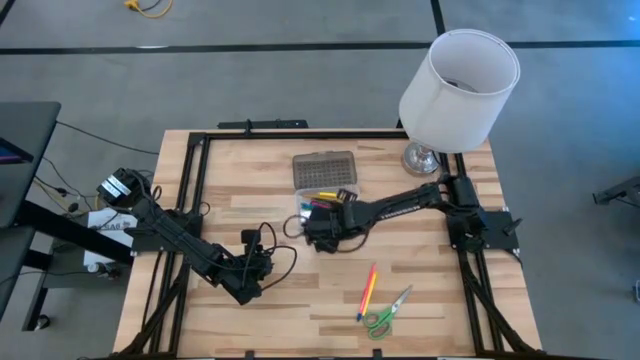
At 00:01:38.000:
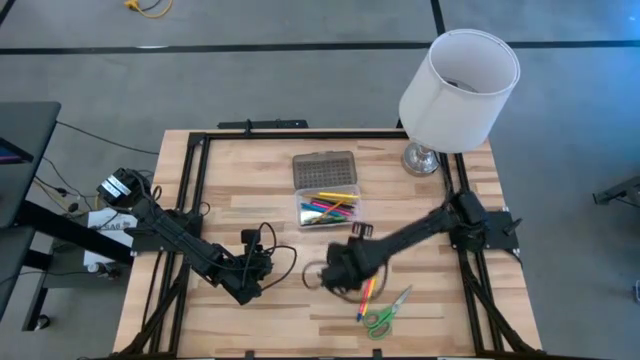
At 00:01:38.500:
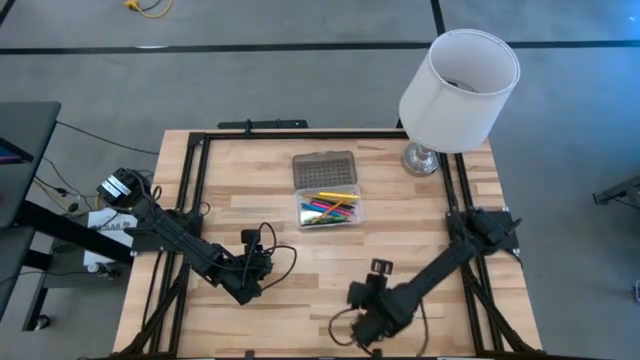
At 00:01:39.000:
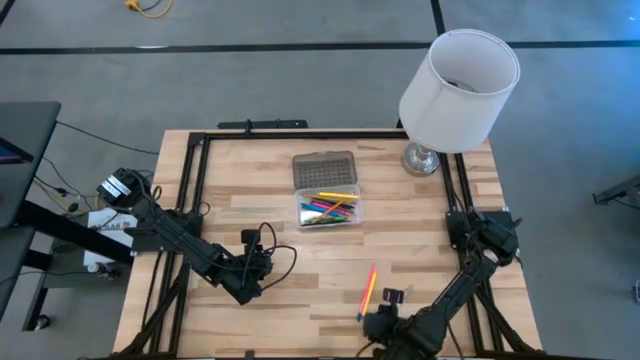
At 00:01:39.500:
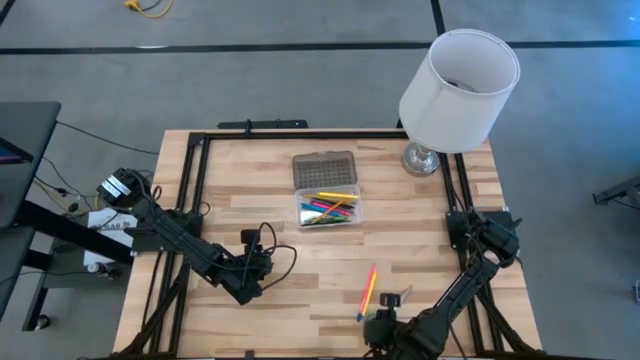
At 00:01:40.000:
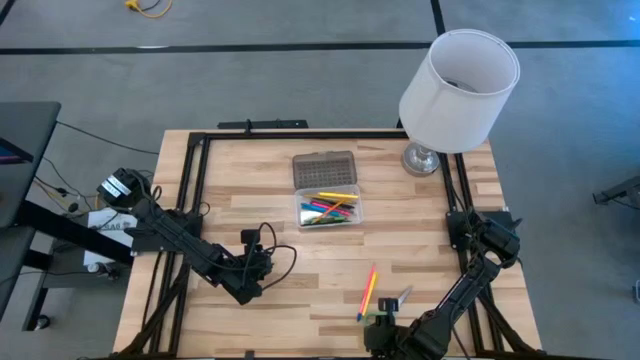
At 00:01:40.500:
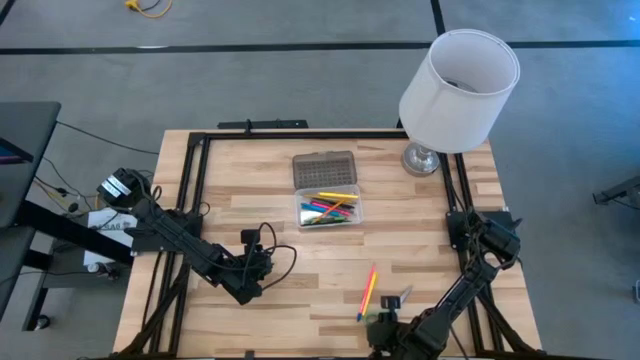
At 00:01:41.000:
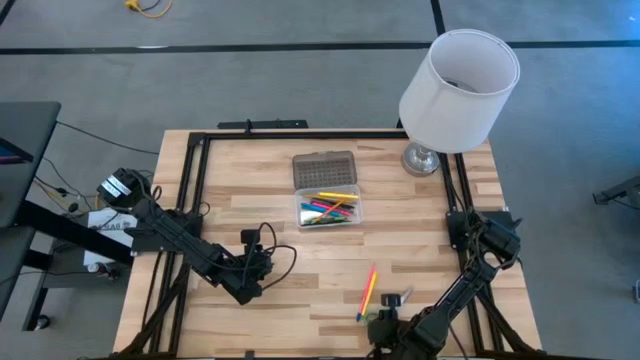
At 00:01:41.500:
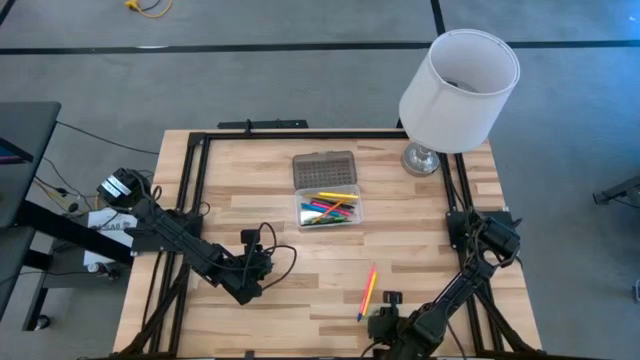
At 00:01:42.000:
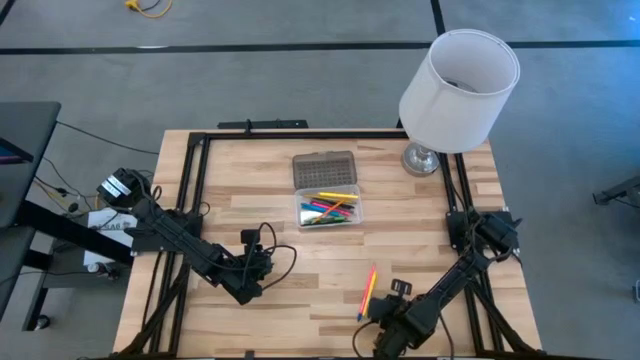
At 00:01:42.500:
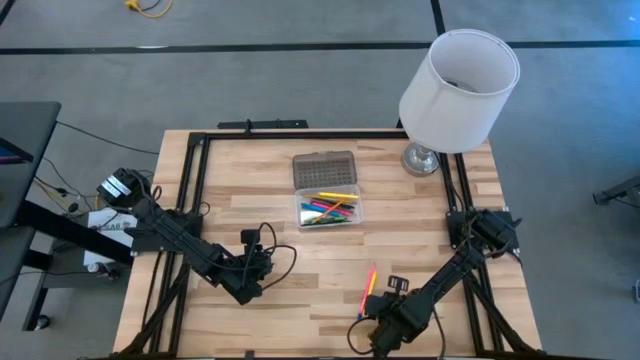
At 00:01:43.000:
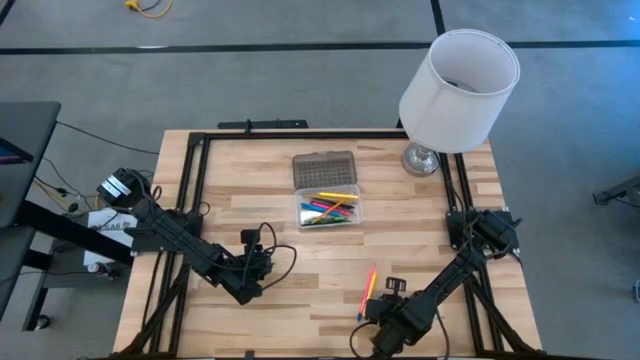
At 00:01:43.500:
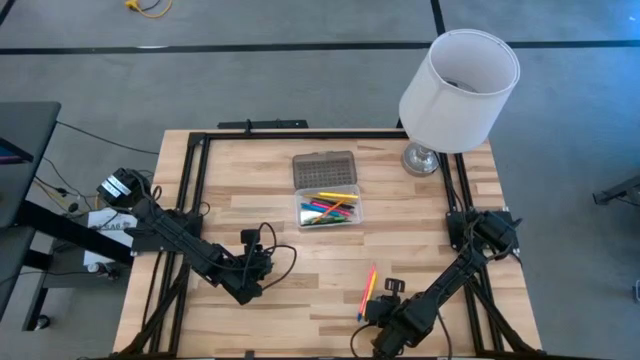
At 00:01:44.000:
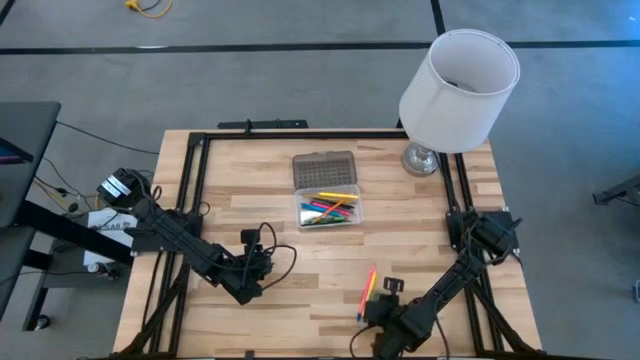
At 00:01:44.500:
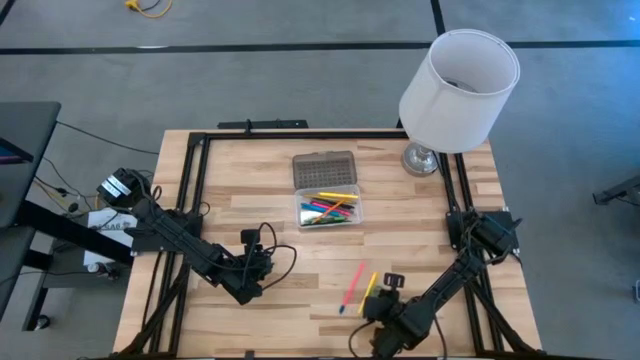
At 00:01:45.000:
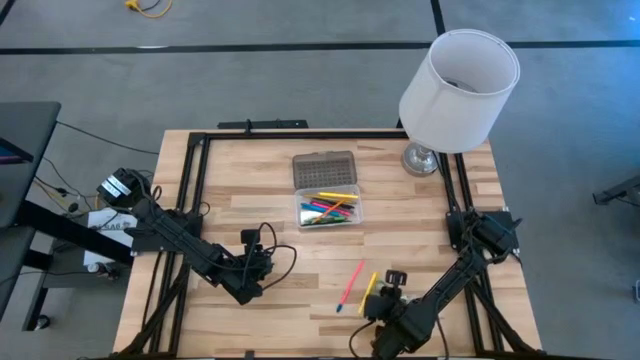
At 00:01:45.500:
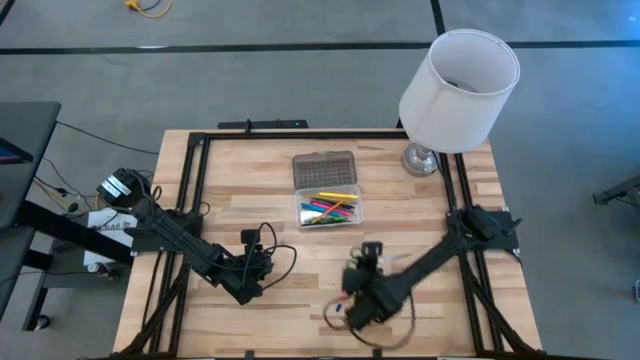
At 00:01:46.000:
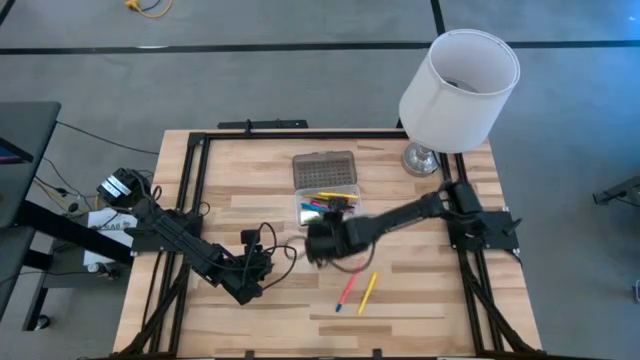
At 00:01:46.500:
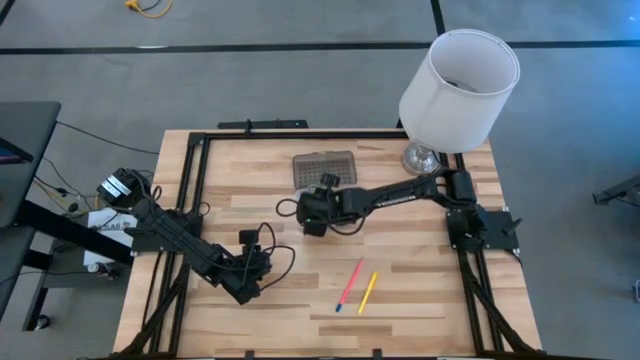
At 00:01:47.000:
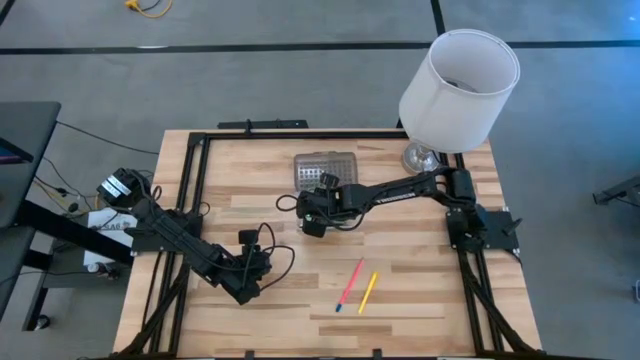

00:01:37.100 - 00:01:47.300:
Task: Pick & place school supplies into a supply box
Put the green scissors into the gray supply box

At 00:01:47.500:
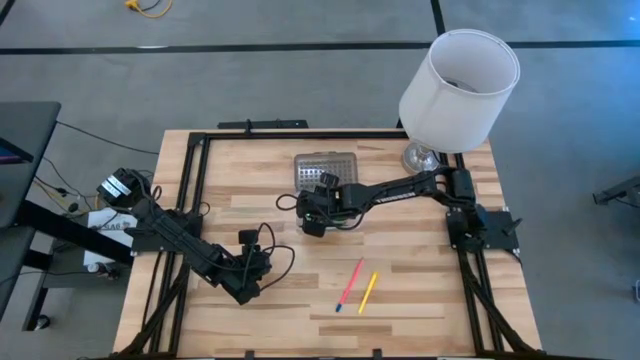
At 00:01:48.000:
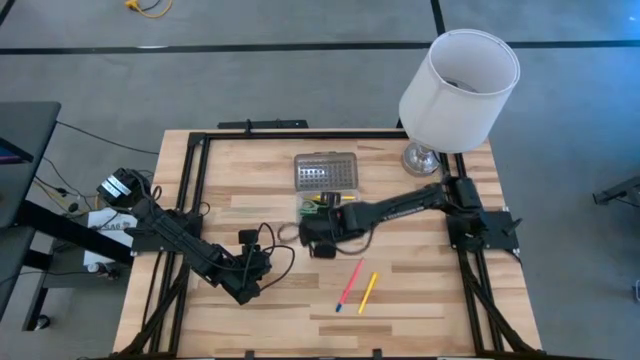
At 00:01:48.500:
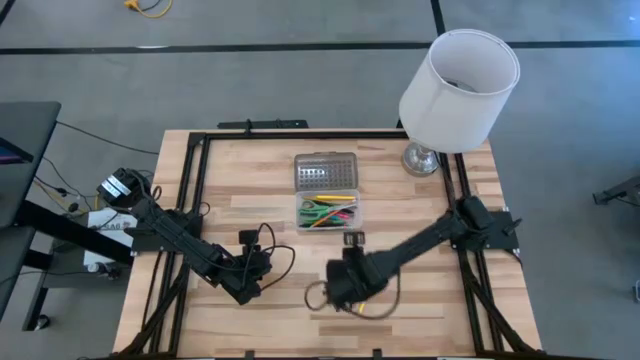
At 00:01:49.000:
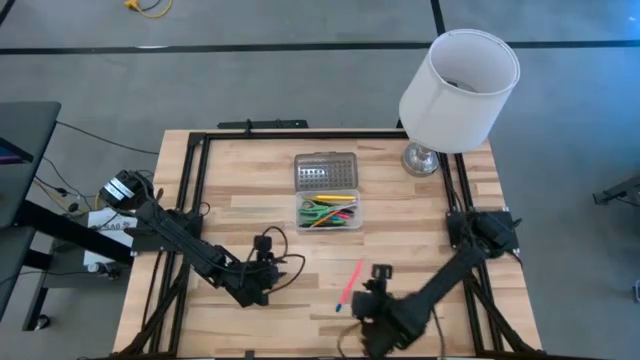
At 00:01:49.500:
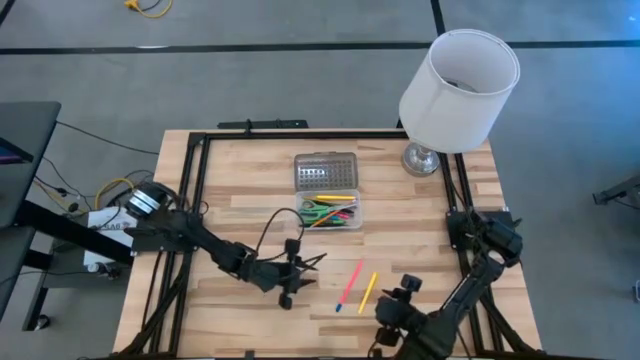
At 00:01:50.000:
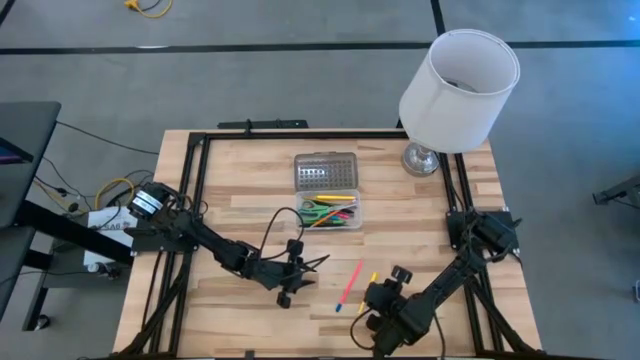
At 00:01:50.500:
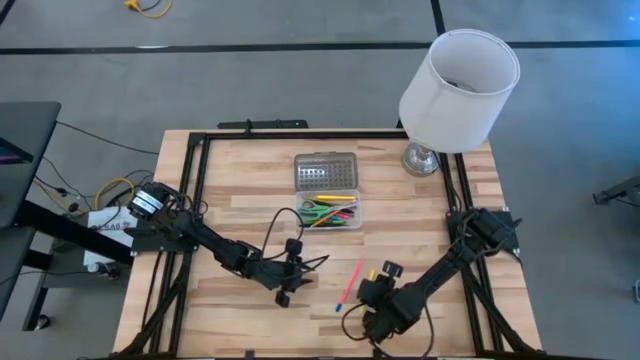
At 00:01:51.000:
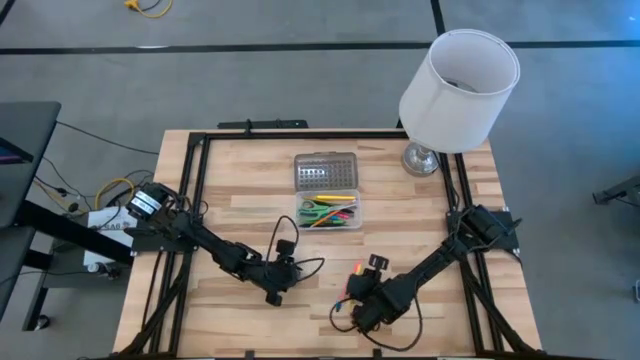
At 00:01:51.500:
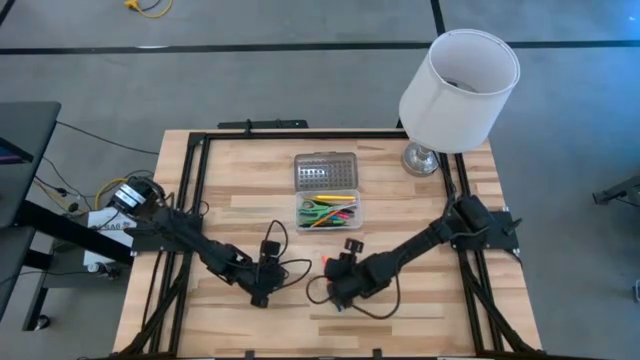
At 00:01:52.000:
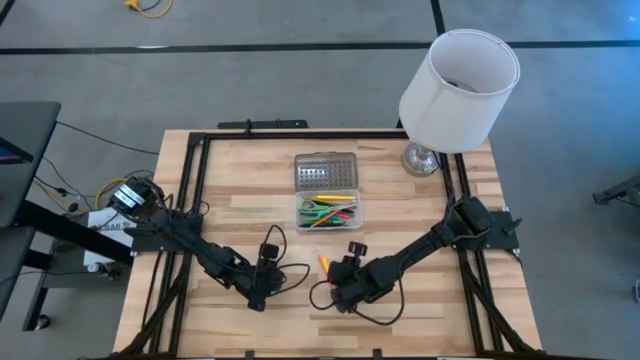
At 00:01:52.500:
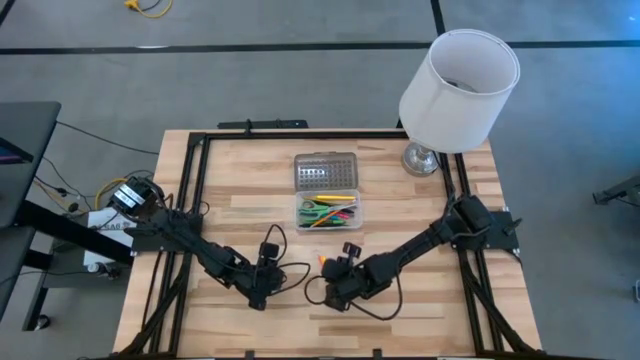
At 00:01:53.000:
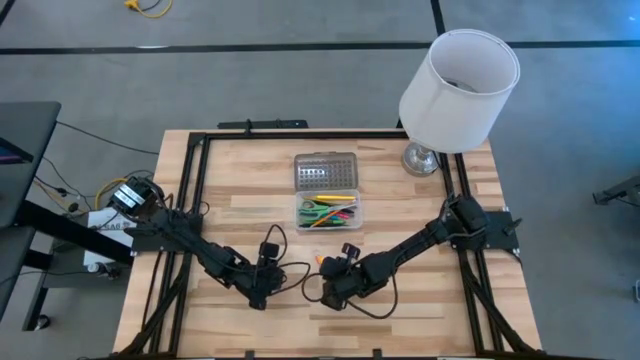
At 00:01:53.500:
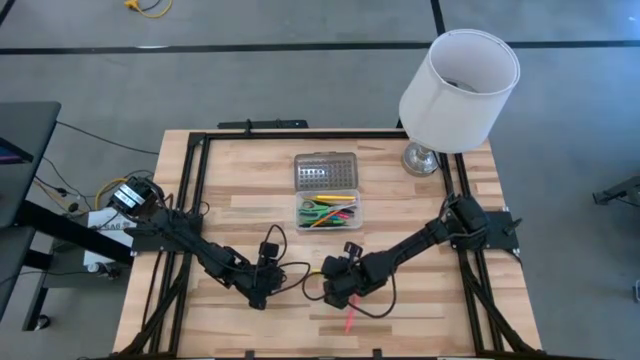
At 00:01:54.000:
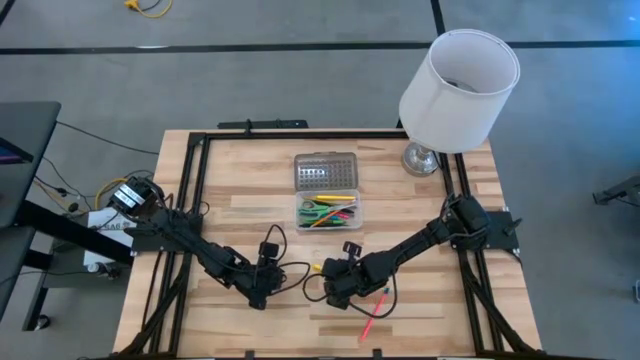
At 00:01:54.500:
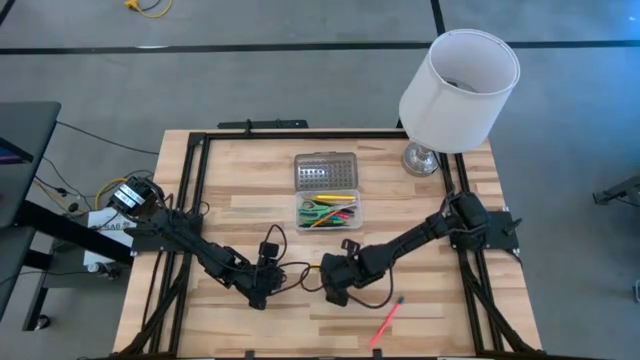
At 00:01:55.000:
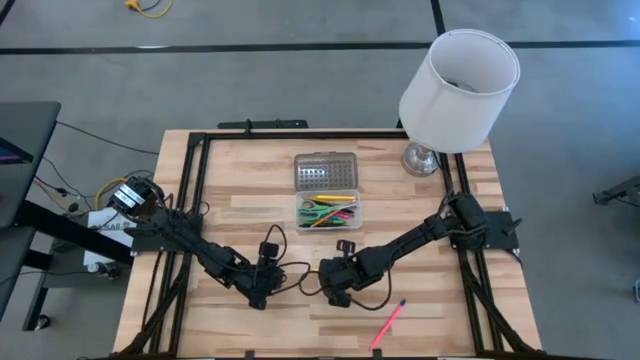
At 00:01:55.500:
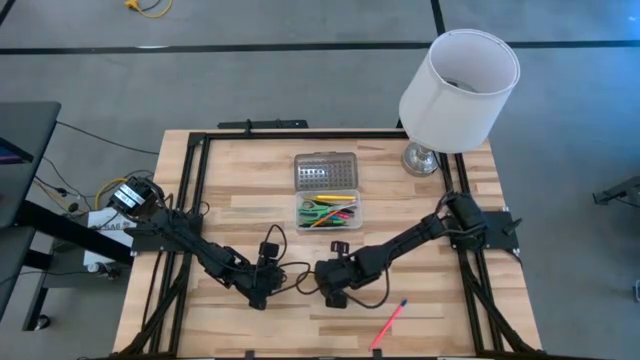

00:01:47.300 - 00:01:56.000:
Put the yellow pen into the gray supply box

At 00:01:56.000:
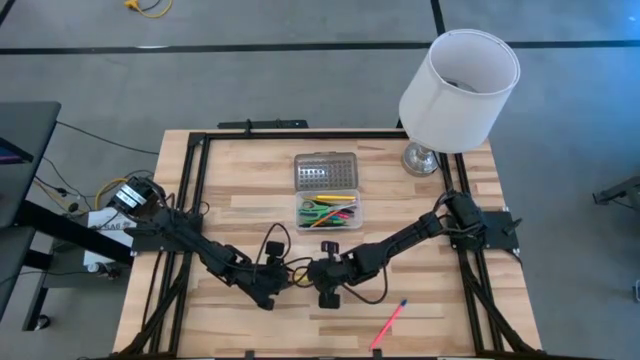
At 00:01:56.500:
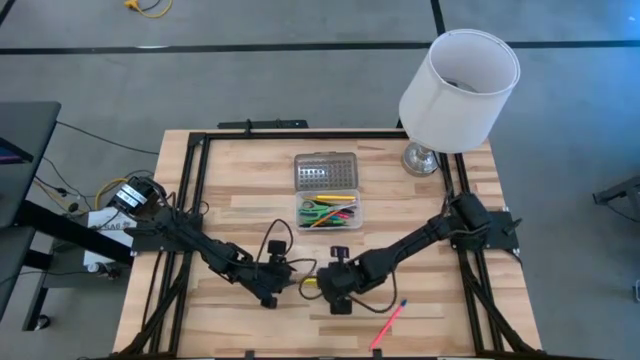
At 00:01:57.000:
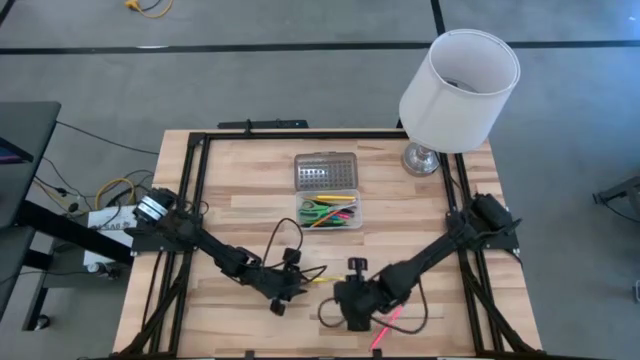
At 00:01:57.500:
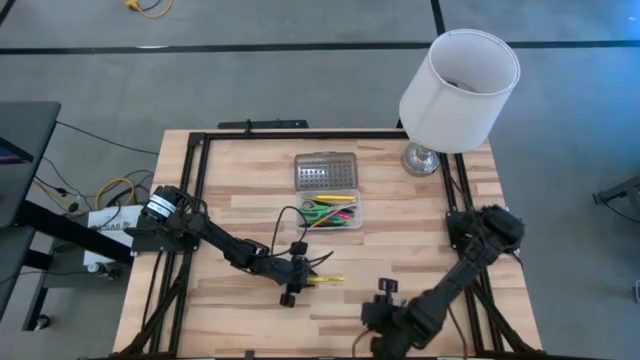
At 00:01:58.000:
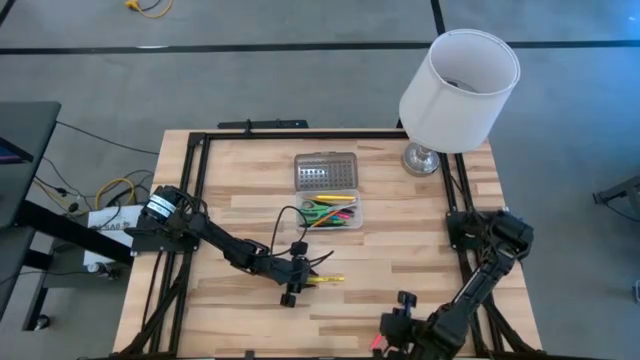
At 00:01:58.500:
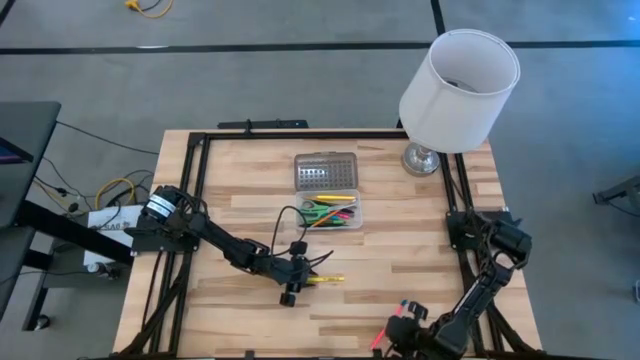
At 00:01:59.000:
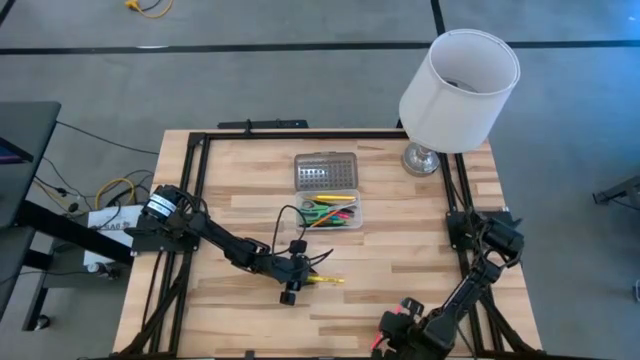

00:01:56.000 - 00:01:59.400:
Adjust the pink pencil
